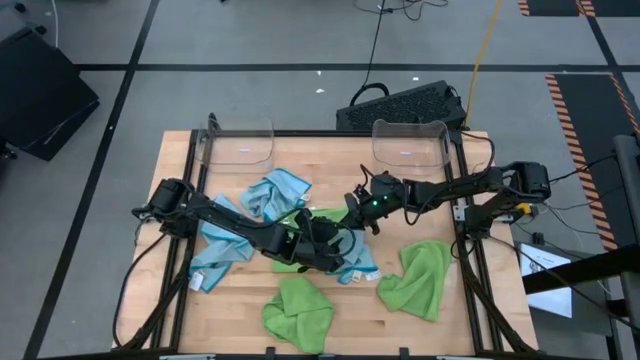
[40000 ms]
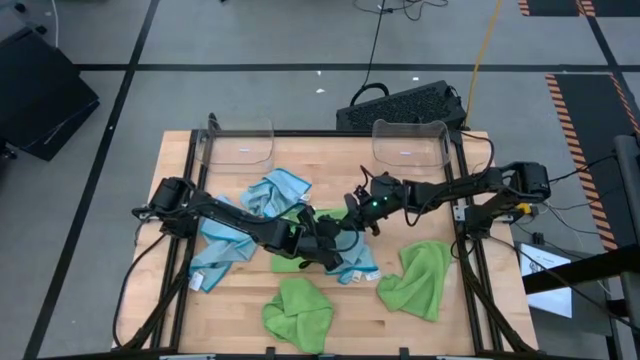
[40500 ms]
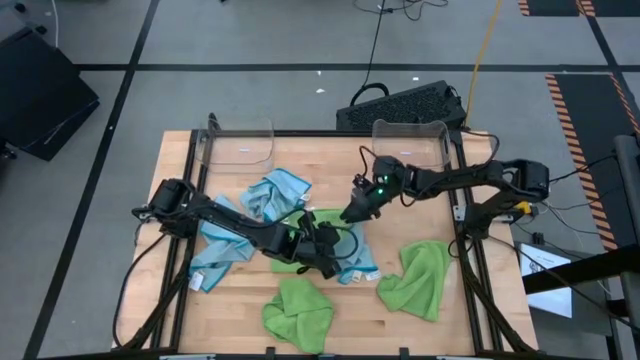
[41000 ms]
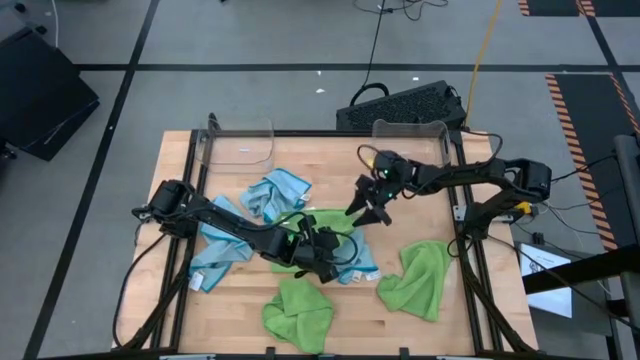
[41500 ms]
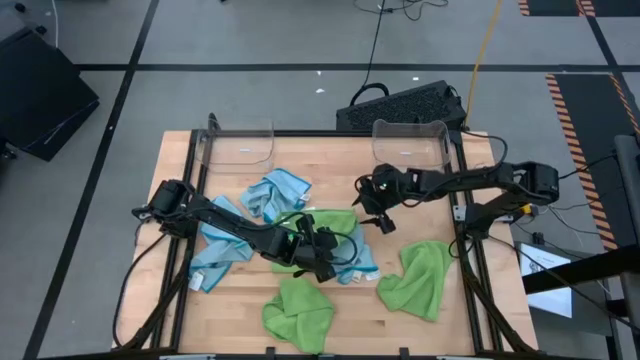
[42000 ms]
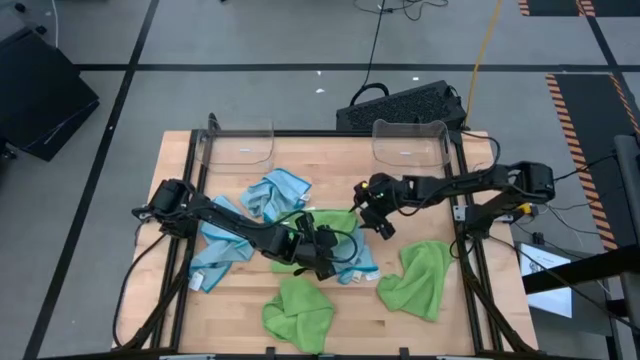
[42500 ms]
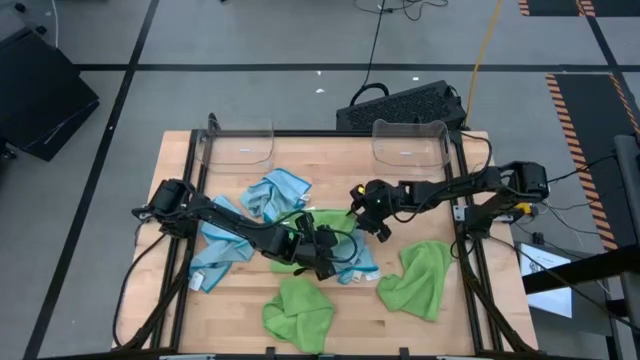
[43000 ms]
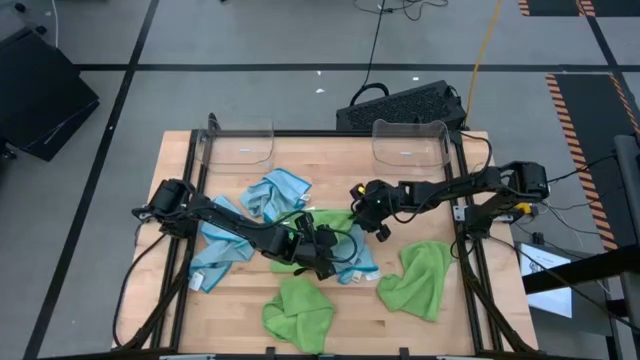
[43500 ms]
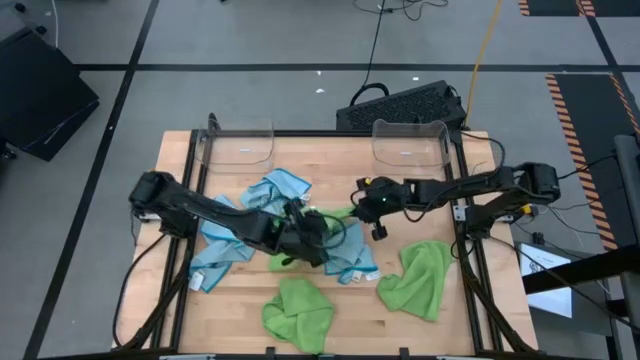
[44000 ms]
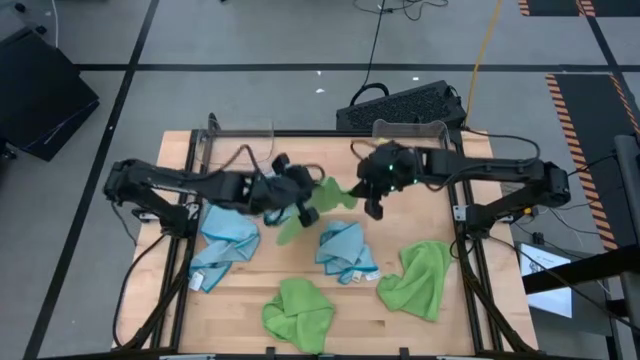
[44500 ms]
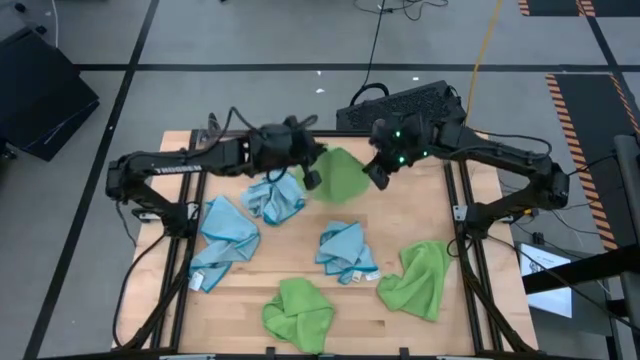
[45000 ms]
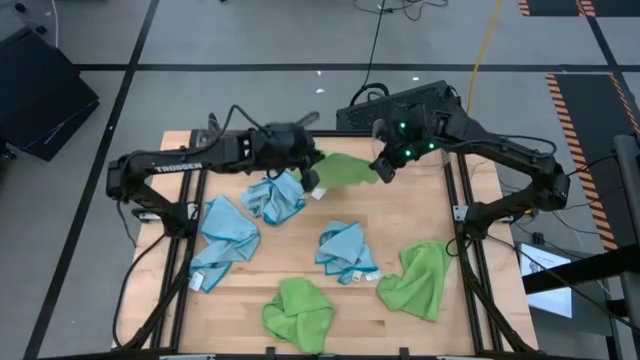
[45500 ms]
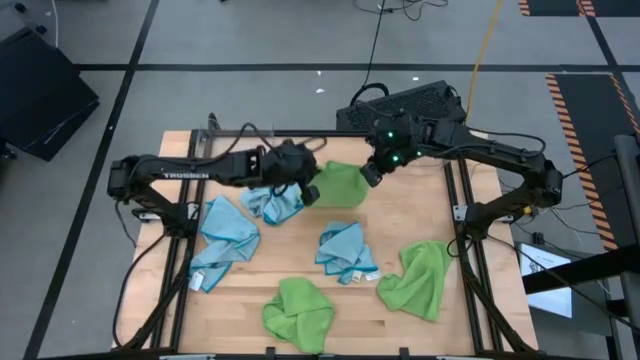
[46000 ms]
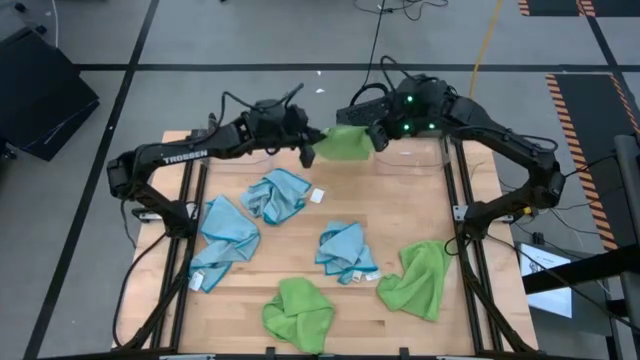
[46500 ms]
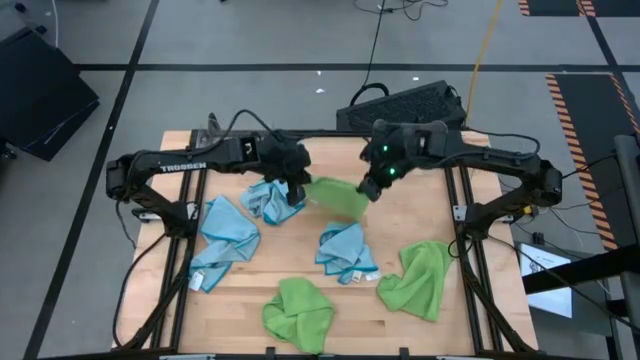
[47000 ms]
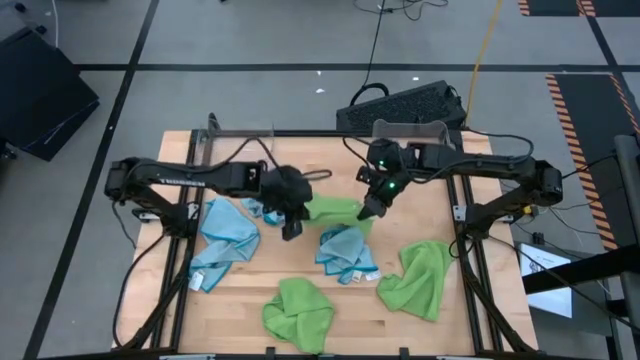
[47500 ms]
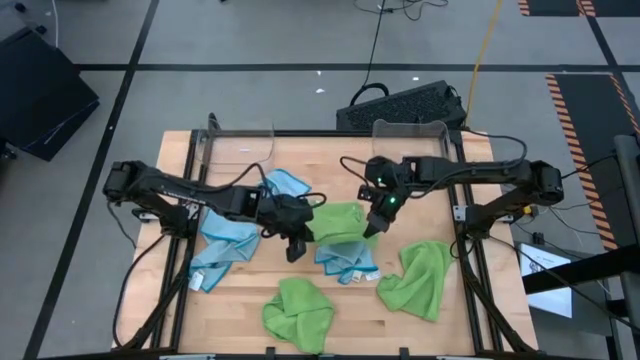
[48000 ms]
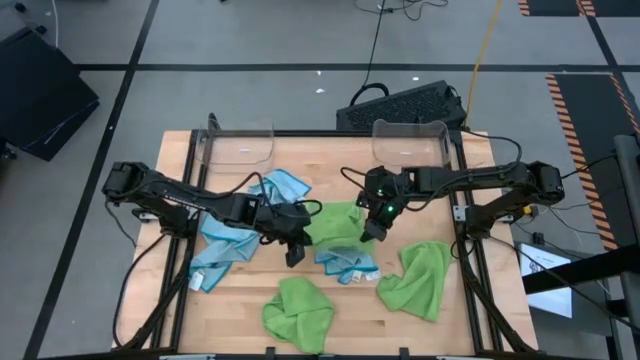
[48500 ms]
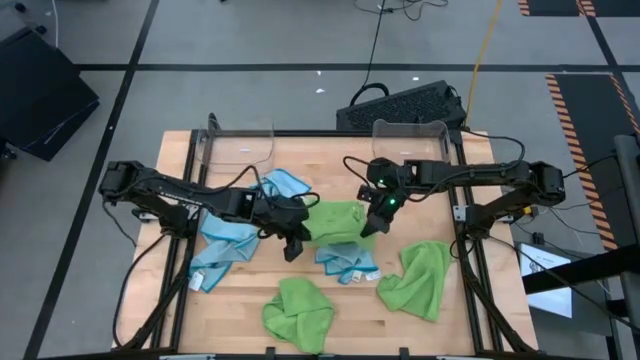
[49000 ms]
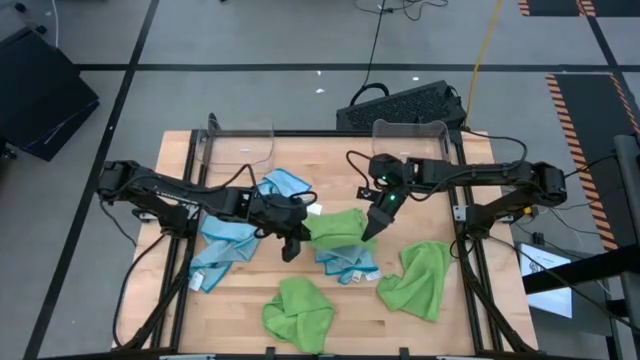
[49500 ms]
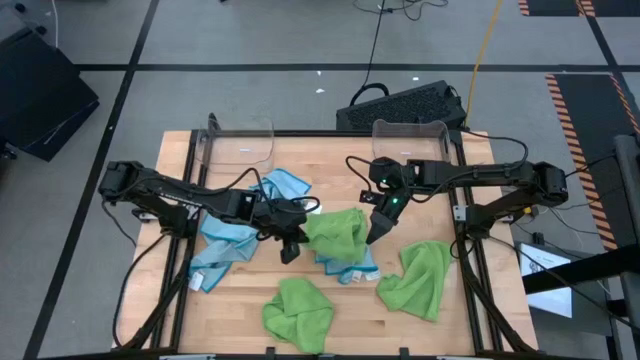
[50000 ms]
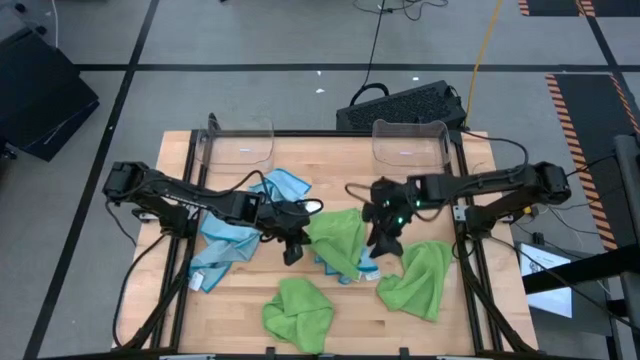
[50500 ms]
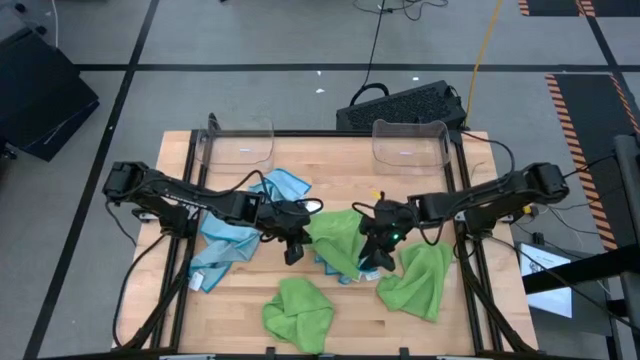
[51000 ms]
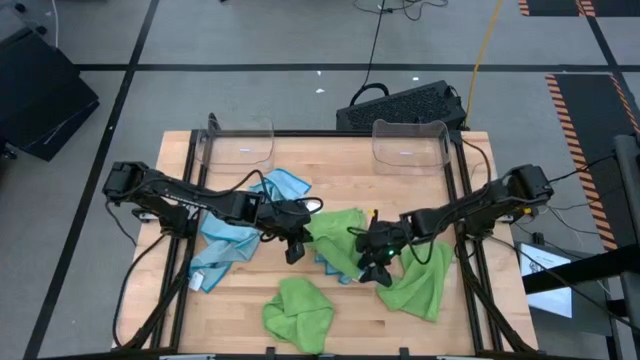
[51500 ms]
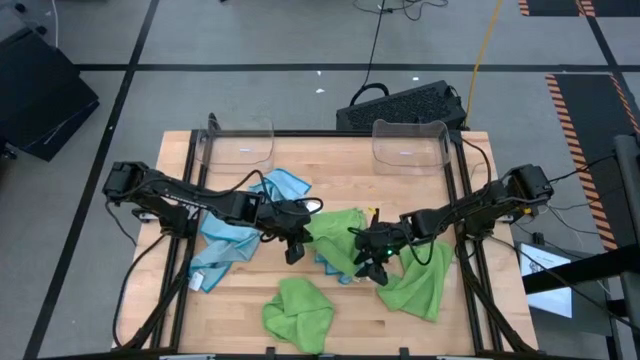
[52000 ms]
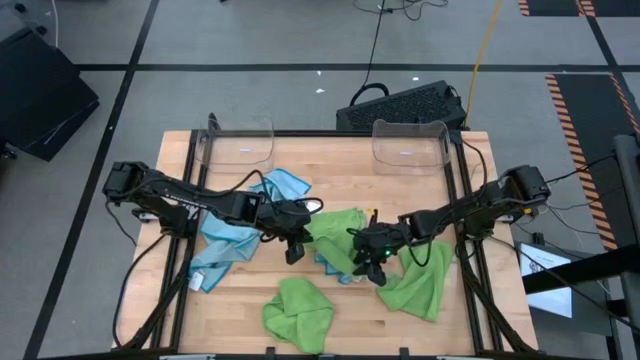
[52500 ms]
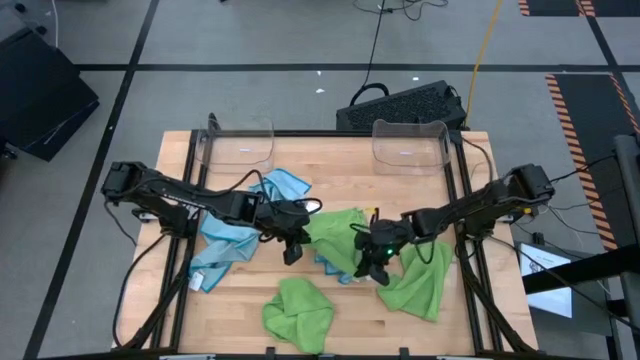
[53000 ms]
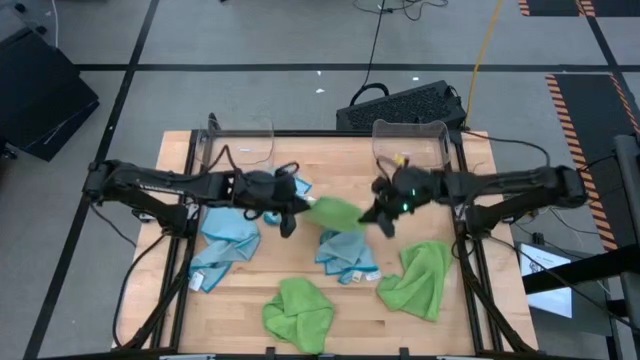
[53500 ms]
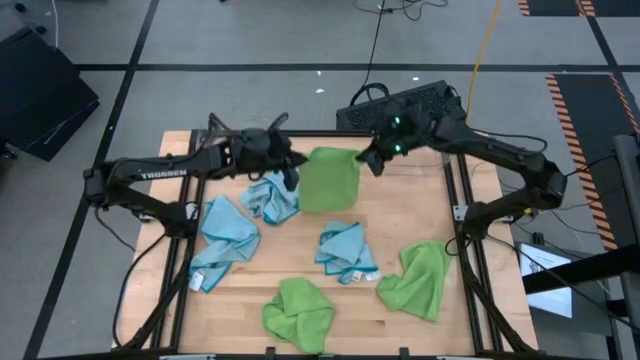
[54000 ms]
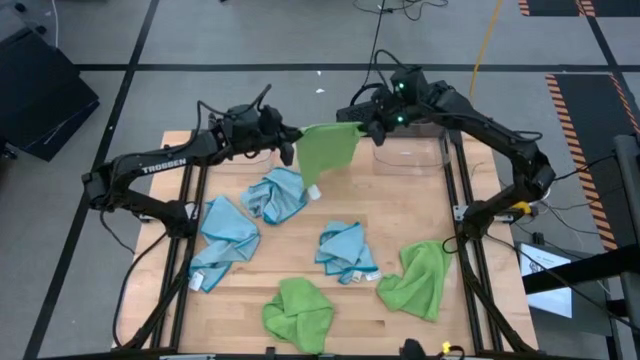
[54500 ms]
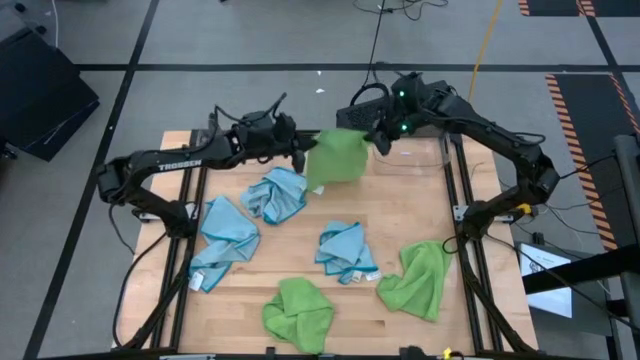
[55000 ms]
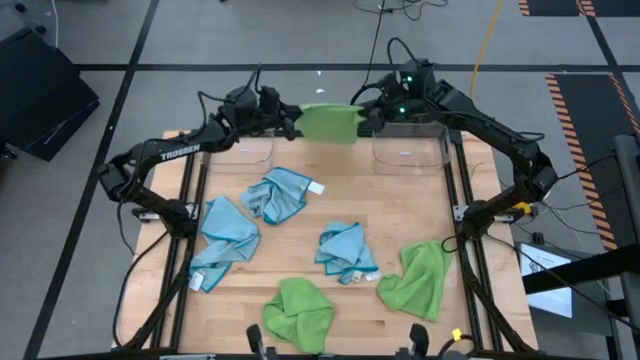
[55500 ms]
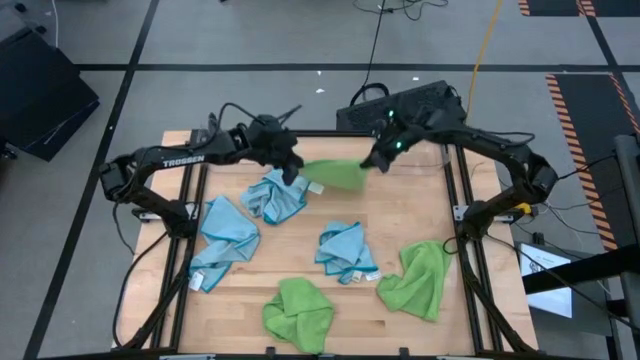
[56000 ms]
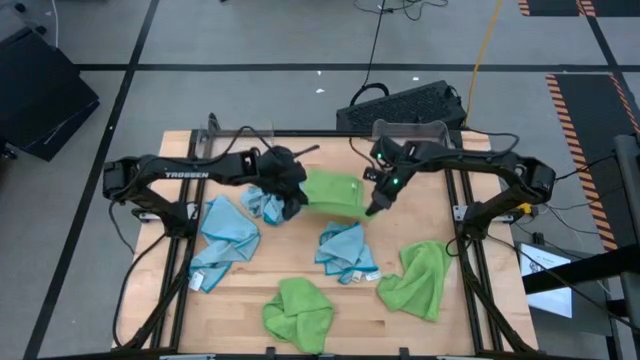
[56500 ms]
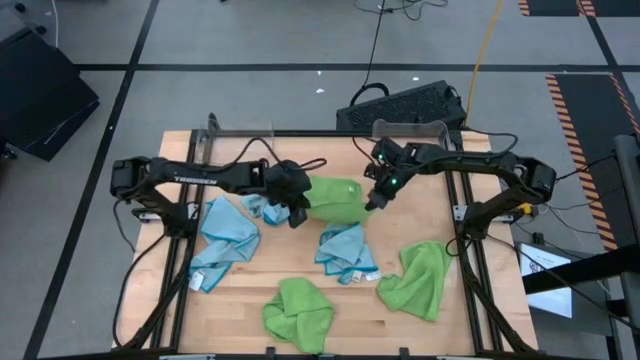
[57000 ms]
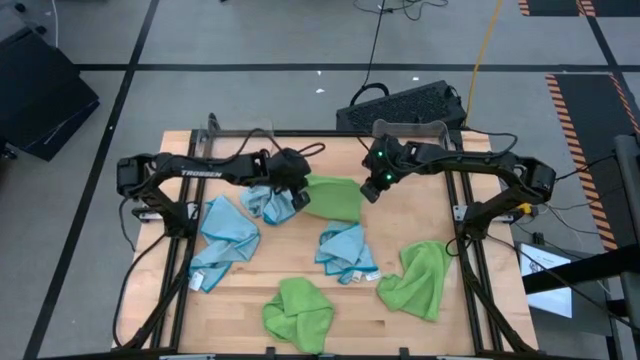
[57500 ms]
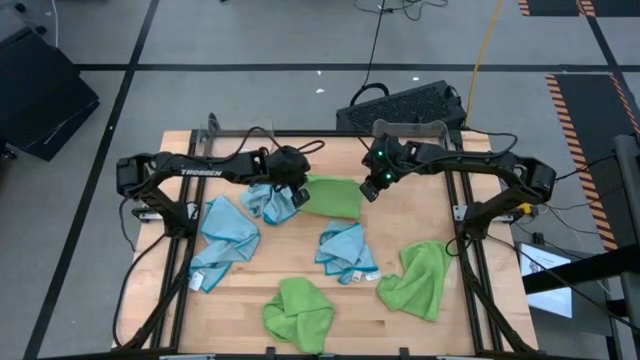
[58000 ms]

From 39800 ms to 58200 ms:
Task: Sort microfiber towel by color & place in baskets
Fold the top green towel

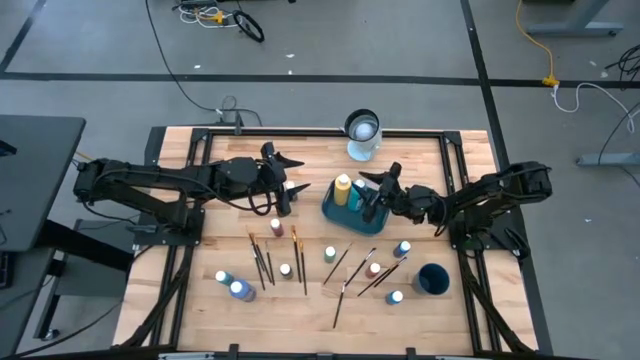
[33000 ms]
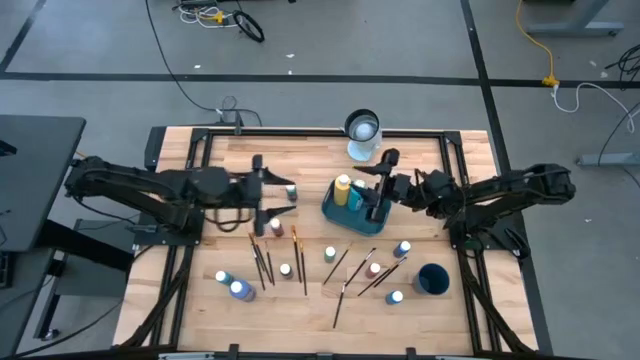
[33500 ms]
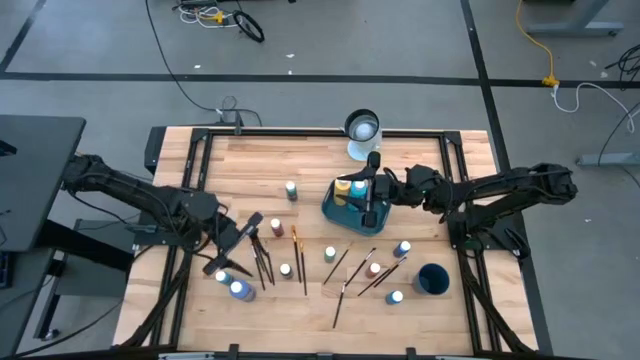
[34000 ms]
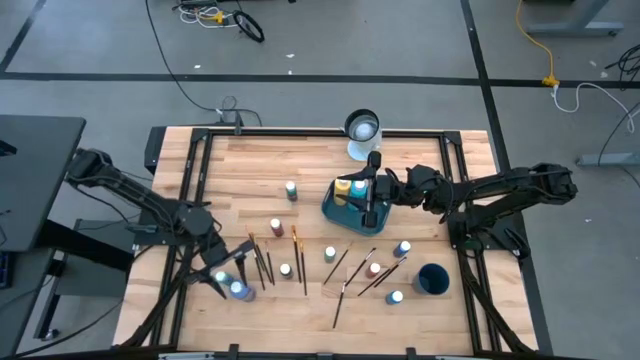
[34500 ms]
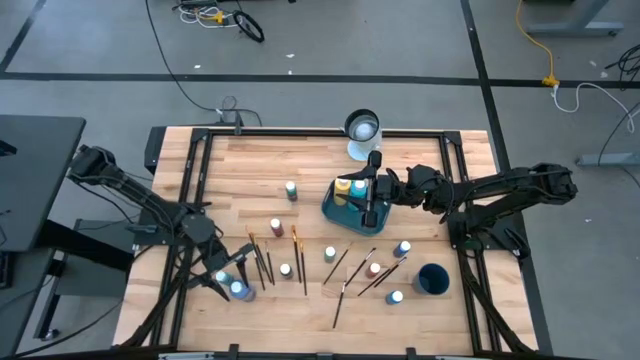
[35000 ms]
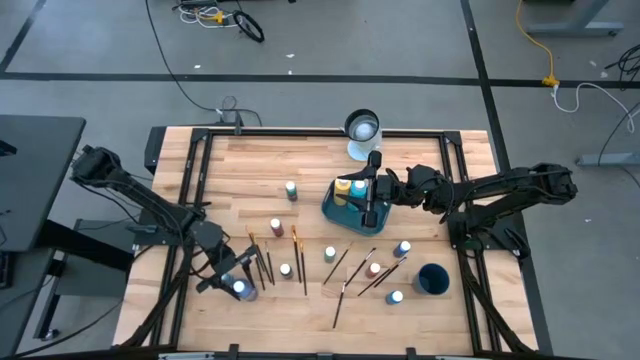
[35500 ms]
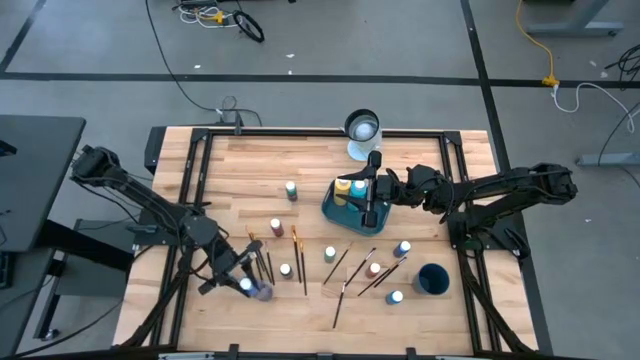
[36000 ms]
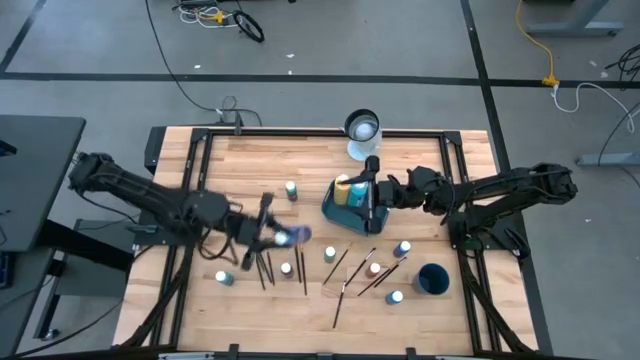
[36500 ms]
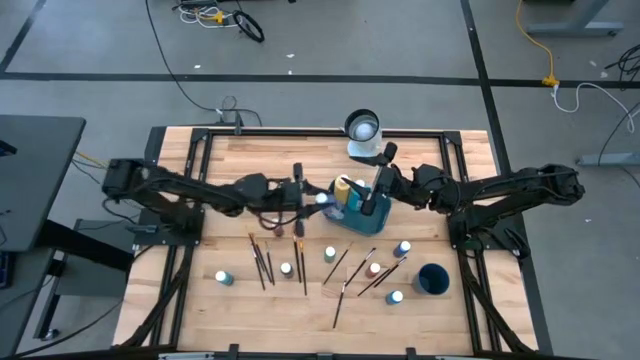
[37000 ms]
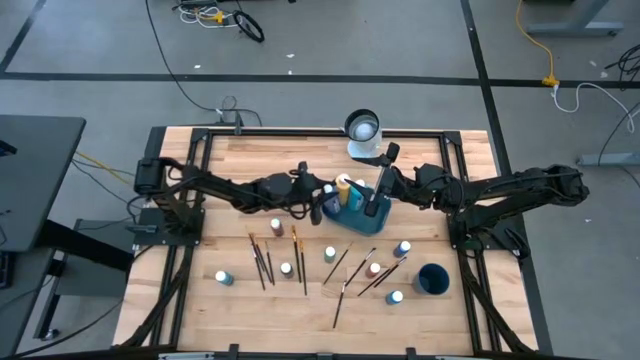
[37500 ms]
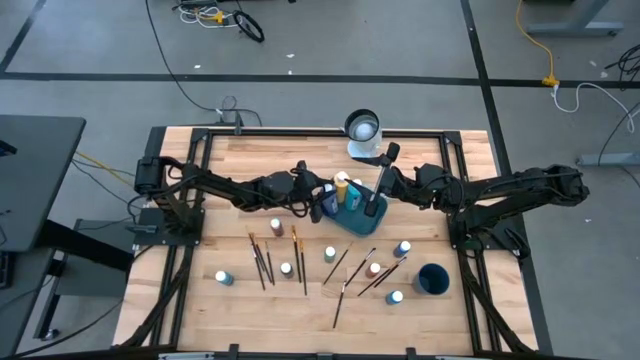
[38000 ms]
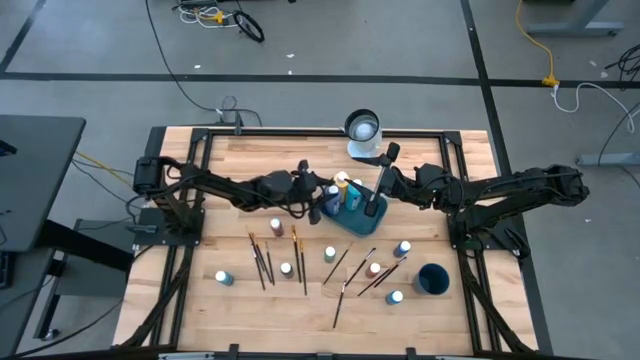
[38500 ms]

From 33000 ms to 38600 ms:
Task: Pick & Place Paint Supplies
Put the large violet paint bottle into the green bin
